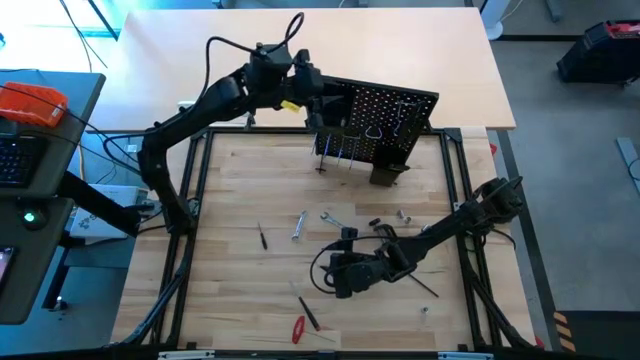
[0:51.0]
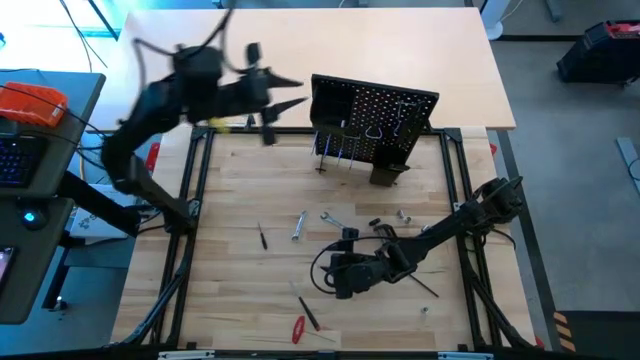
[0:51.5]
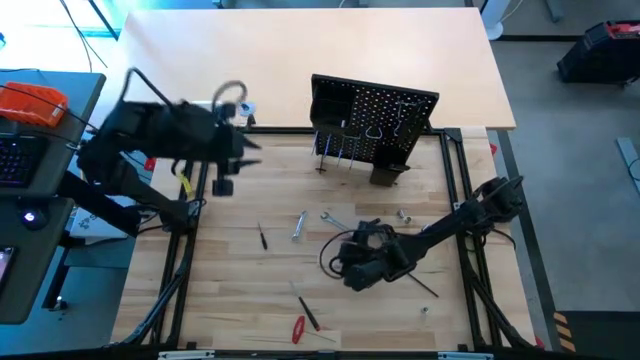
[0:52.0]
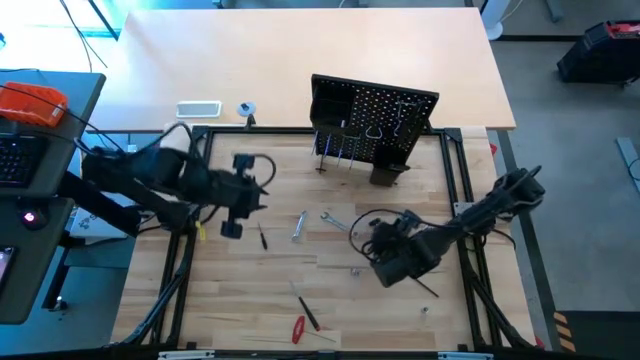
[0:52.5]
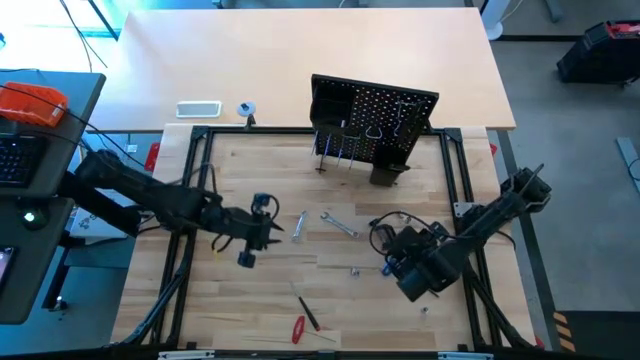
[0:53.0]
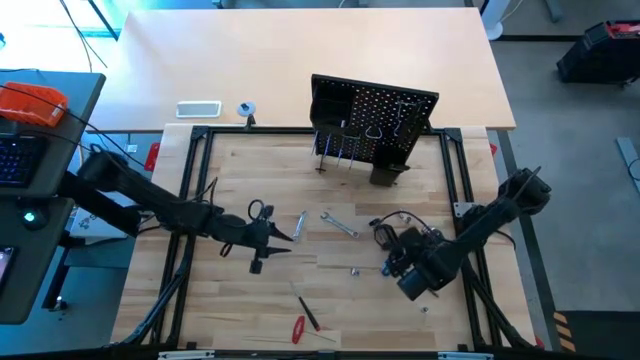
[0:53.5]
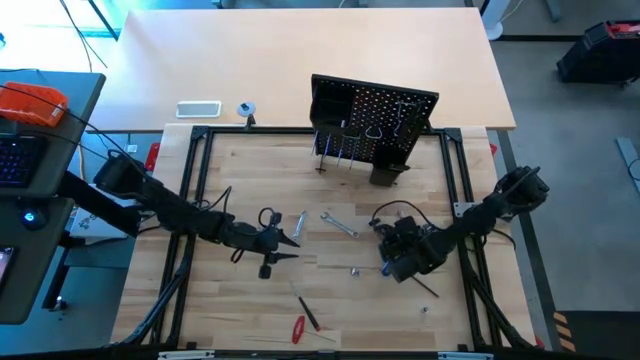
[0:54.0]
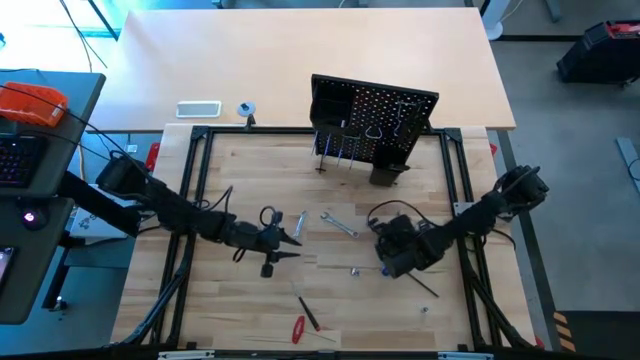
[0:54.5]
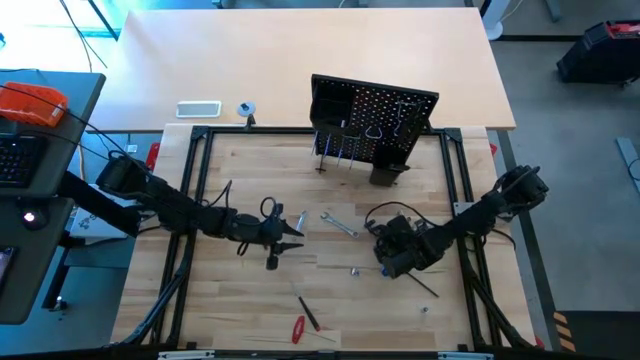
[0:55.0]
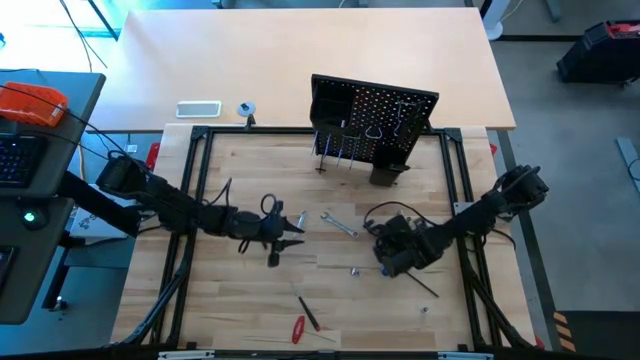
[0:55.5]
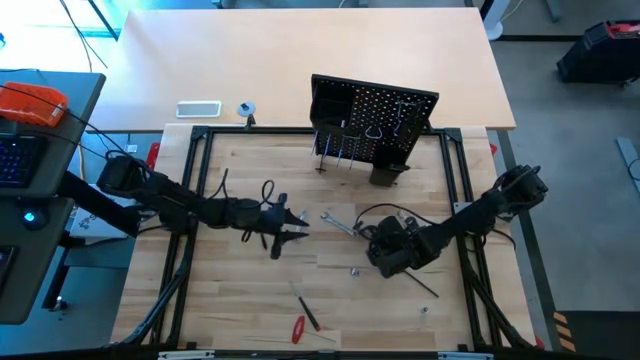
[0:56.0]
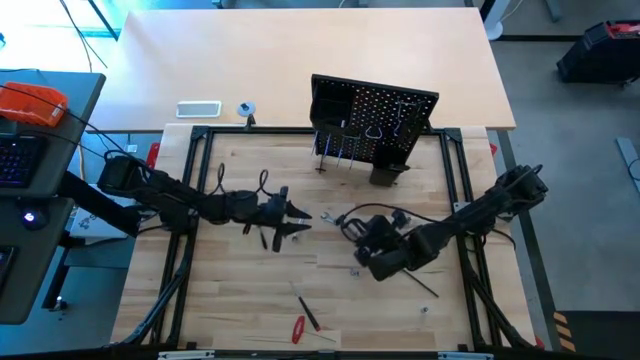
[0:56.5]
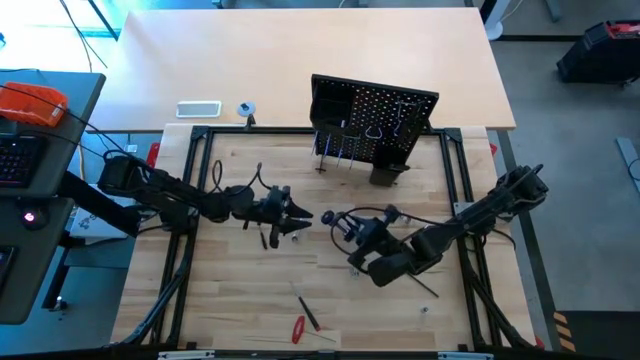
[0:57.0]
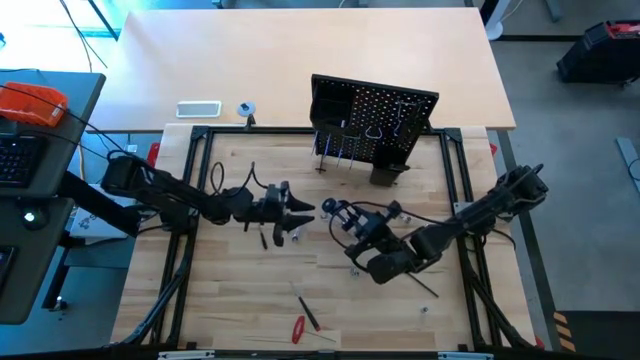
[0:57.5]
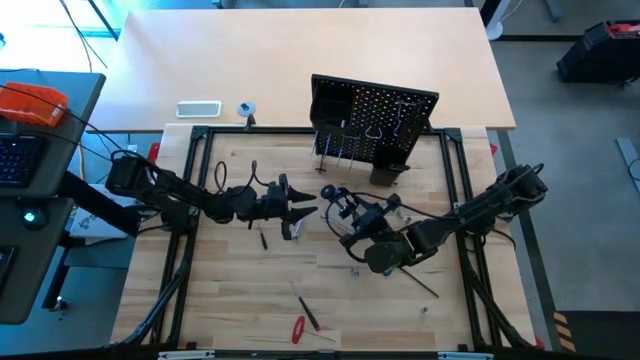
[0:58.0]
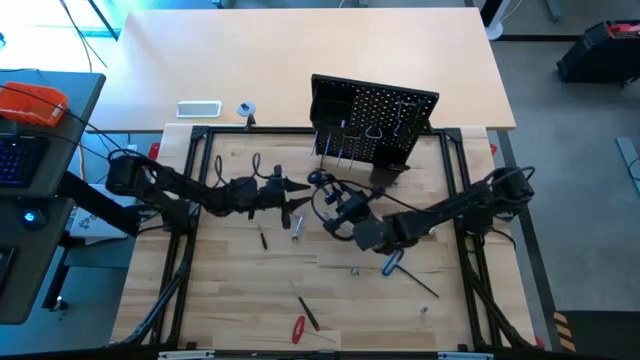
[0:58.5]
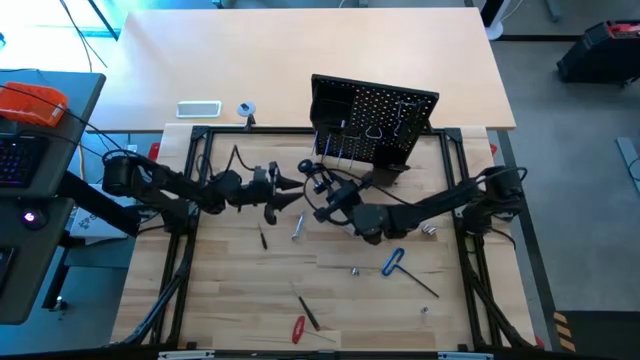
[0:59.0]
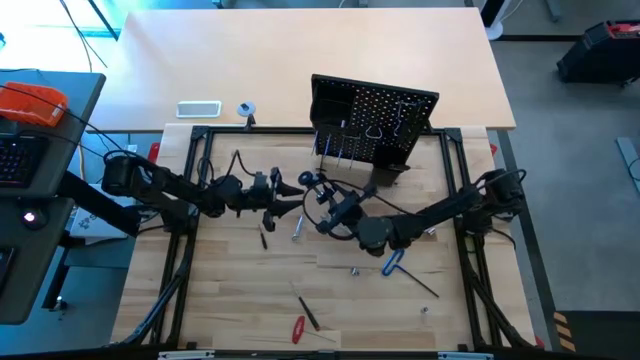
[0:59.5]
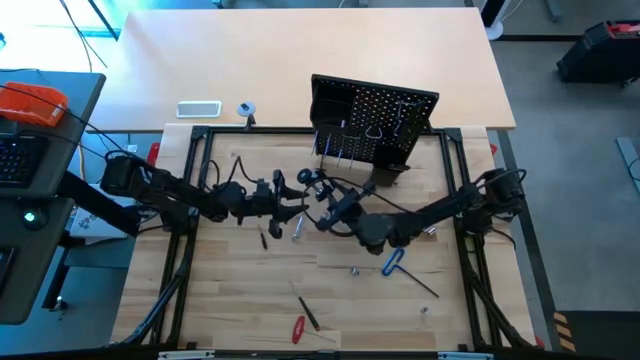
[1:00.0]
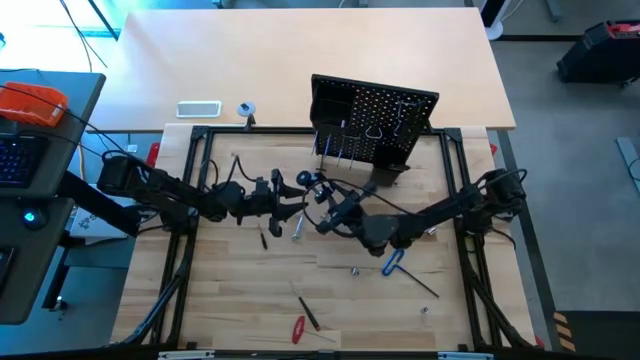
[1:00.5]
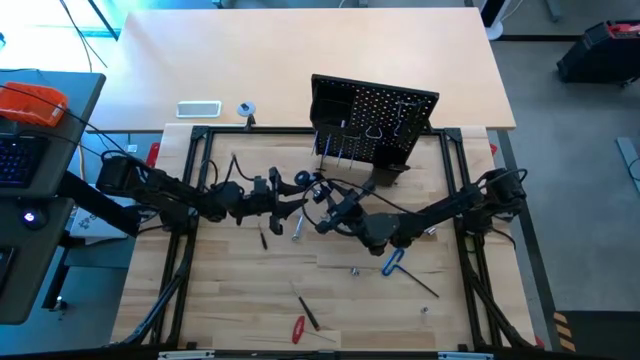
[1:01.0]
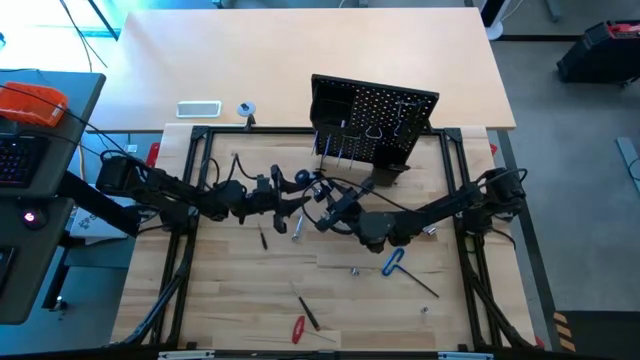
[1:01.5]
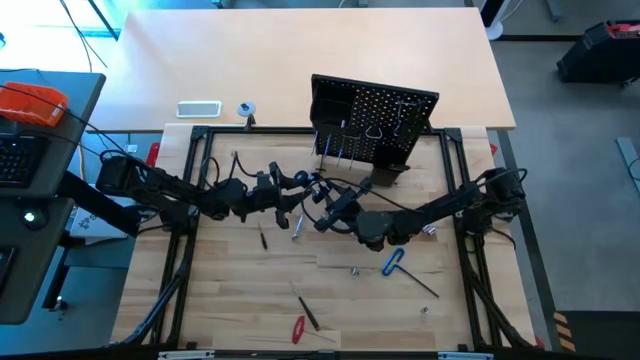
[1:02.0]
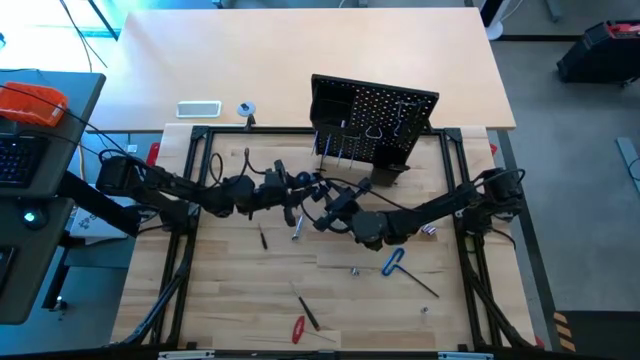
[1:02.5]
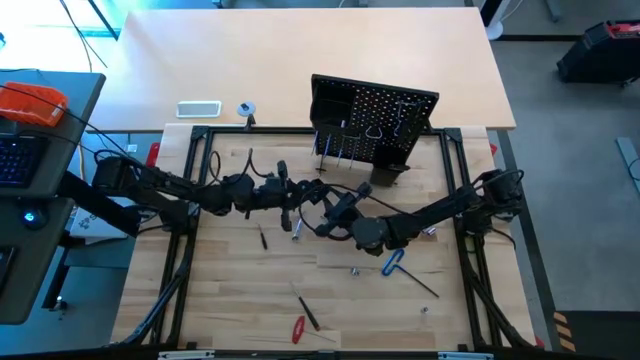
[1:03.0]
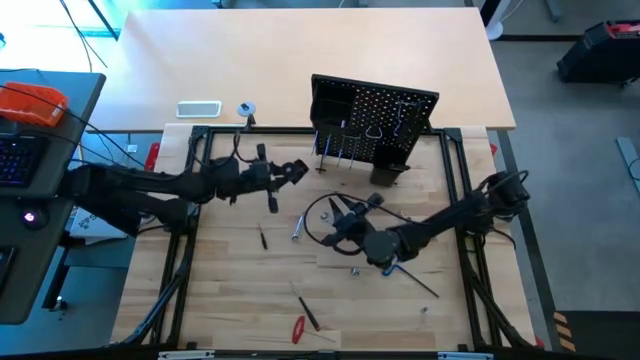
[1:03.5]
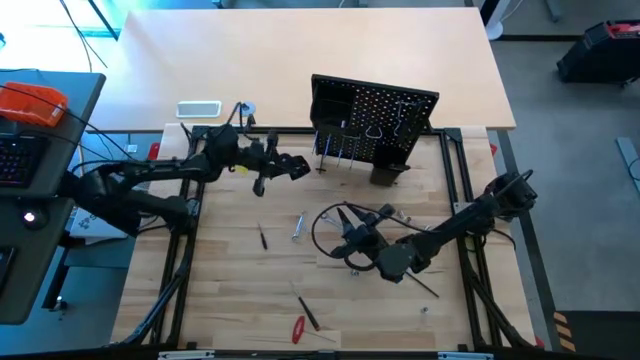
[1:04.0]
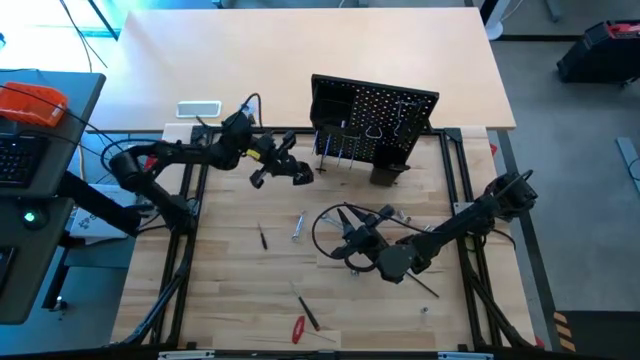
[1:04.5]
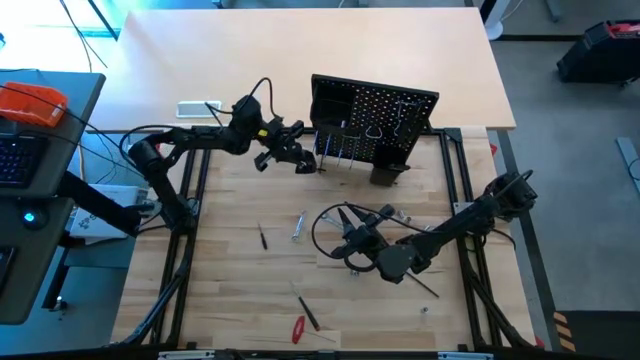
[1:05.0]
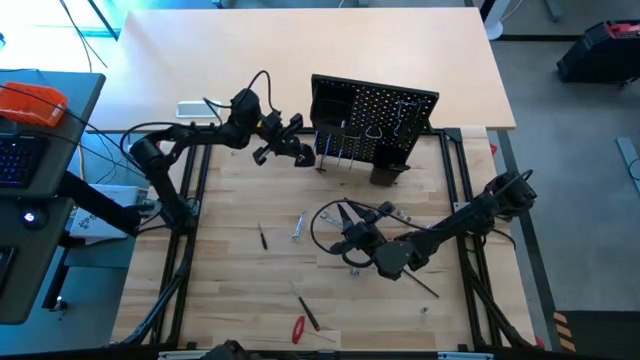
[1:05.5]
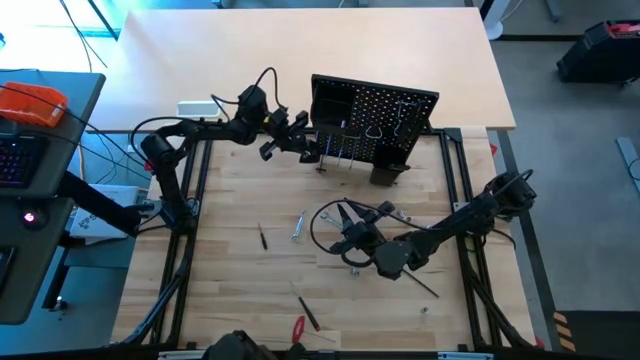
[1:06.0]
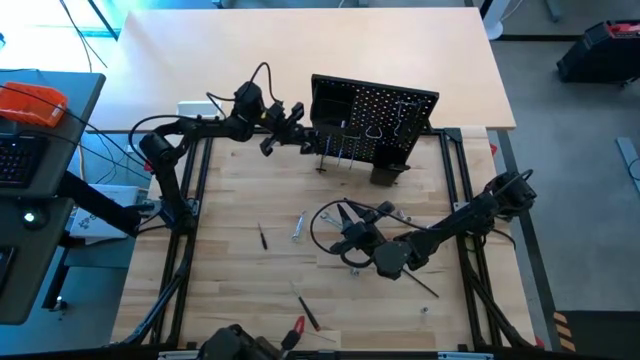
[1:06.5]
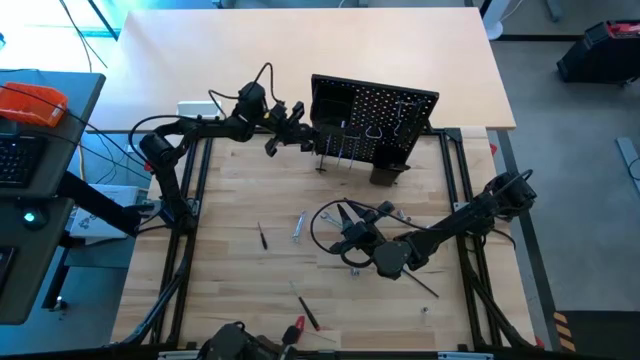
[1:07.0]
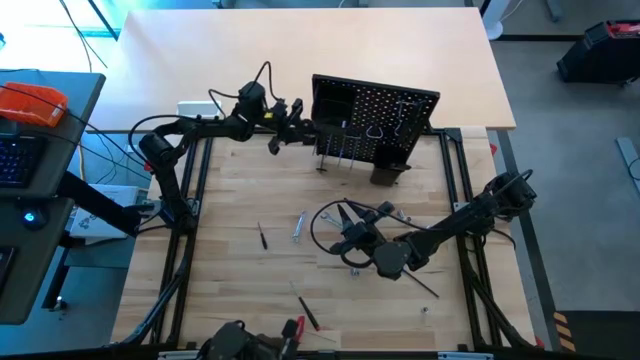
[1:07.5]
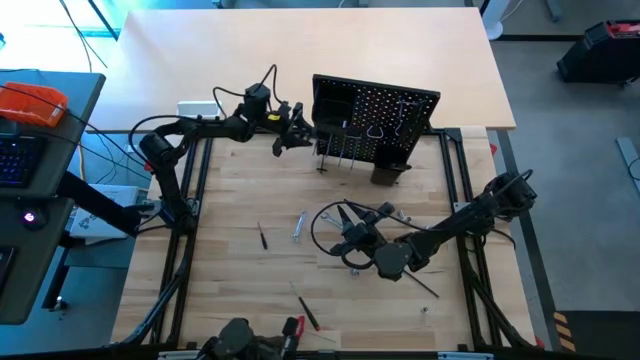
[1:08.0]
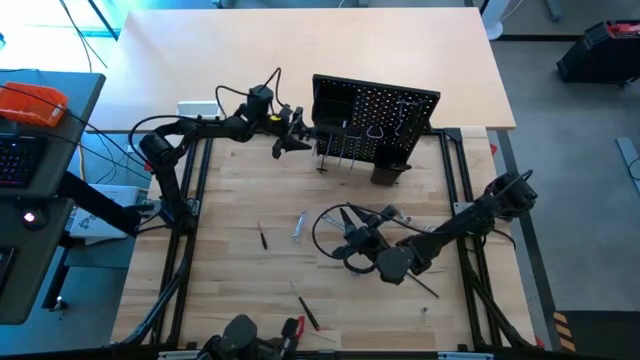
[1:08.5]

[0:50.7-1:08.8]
Task: Hang tools onto peg board
Hang the black universal C-clamp mount onto the pegboard

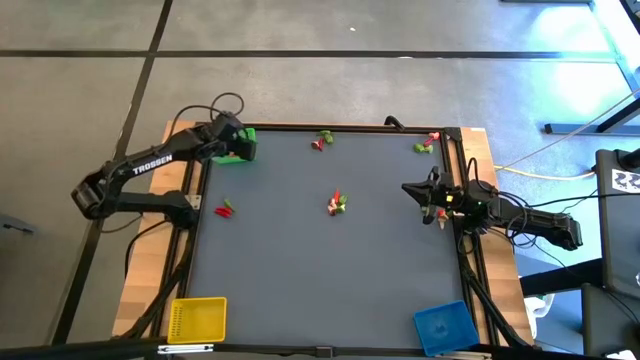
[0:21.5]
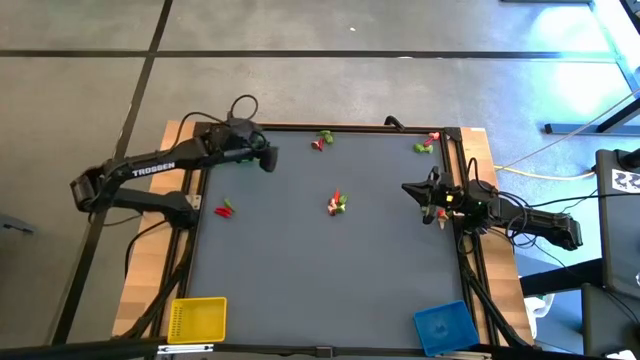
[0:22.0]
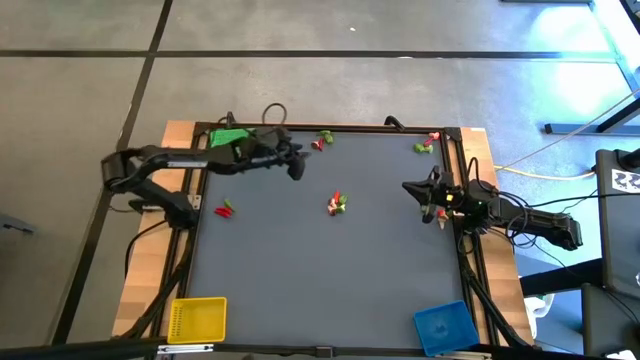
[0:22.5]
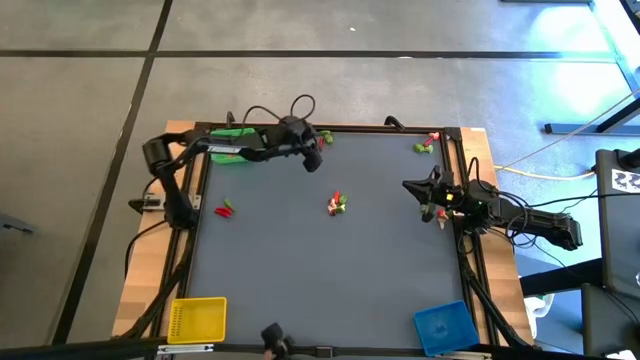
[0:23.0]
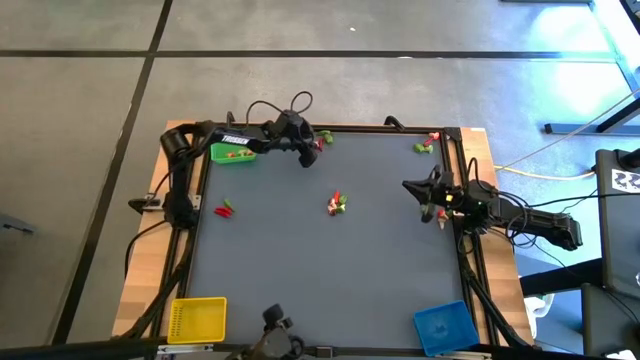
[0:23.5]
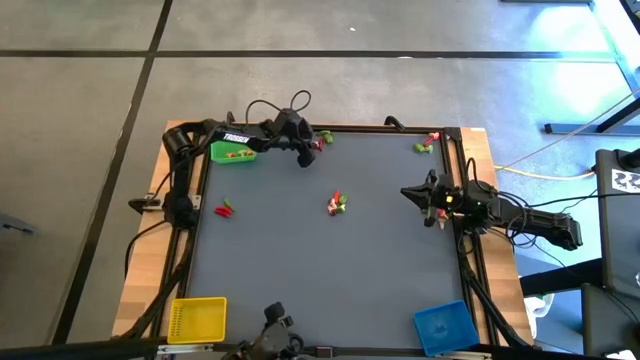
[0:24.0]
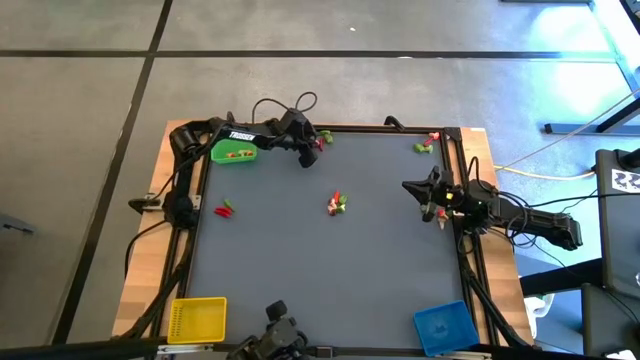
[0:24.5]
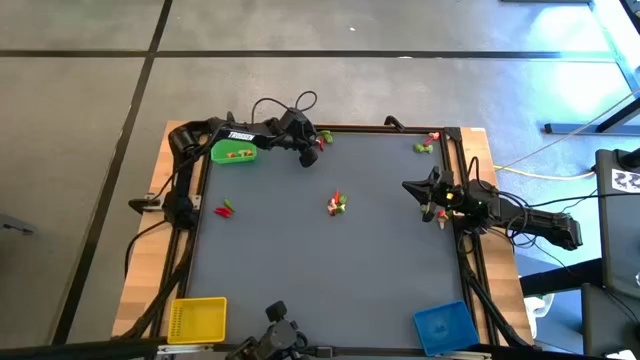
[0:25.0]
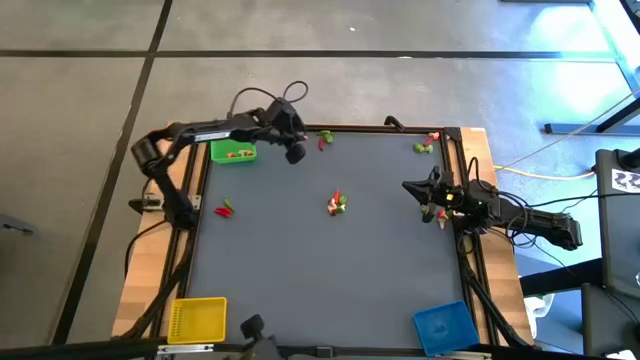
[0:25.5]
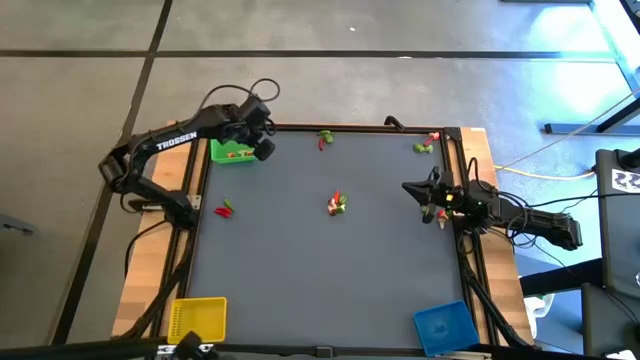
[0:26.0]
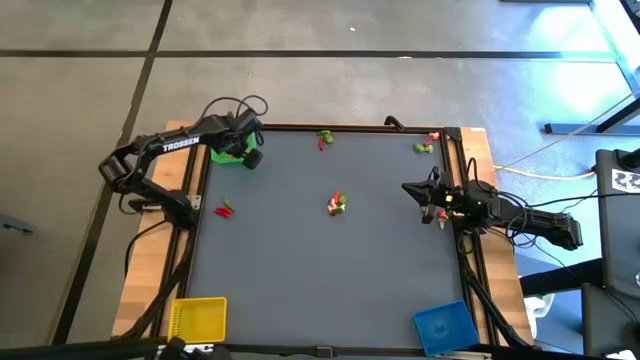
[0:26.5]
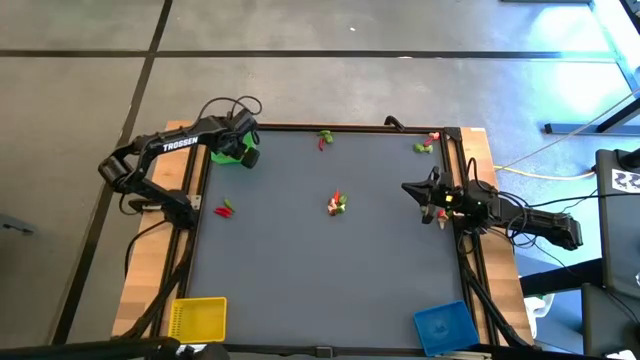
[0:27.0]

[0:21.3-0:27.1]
Task: Sort produce into baskets
Put the brown mushroom into the green bin
